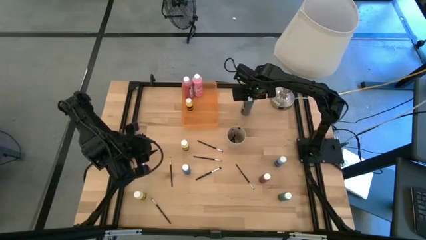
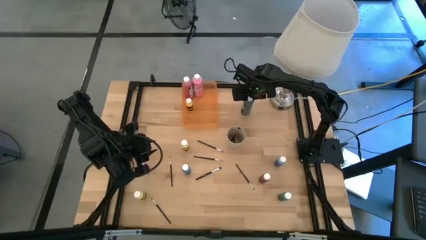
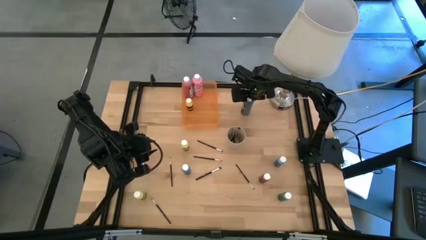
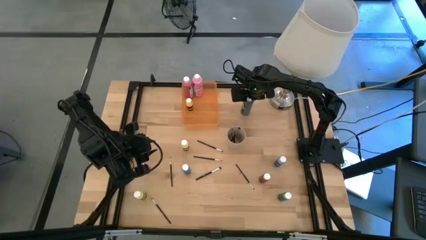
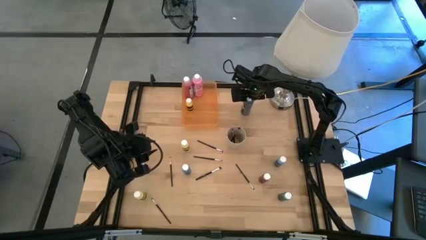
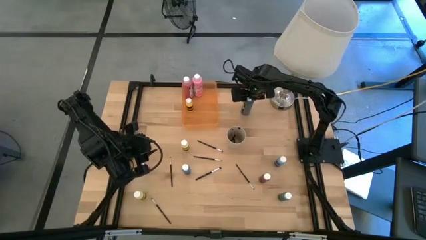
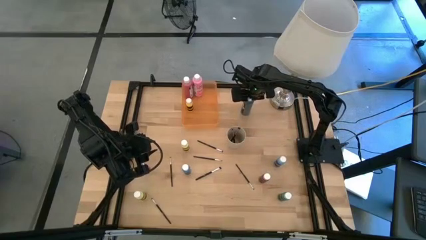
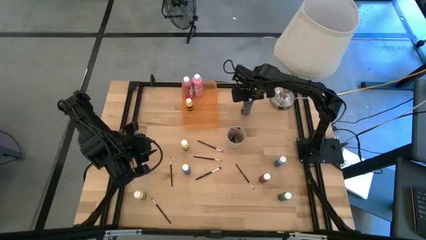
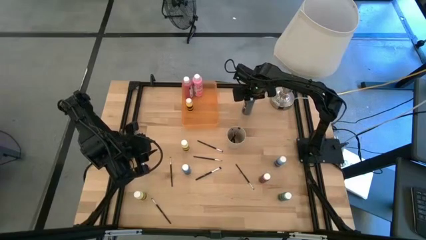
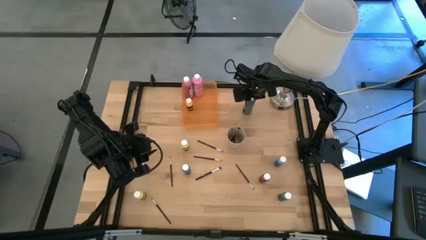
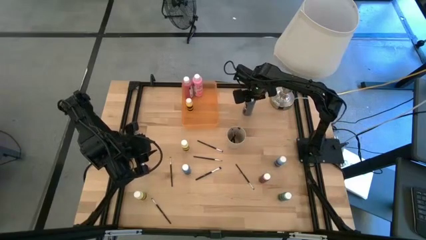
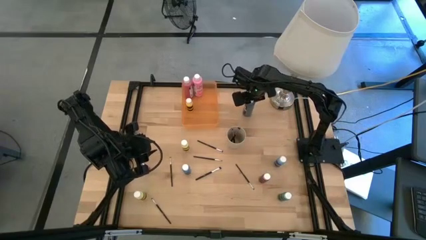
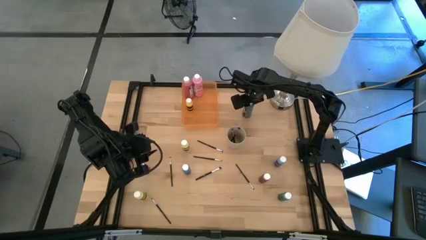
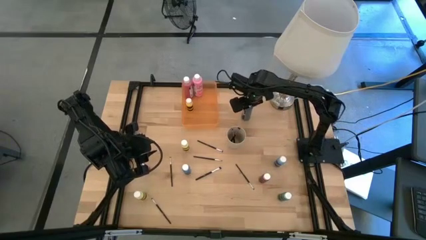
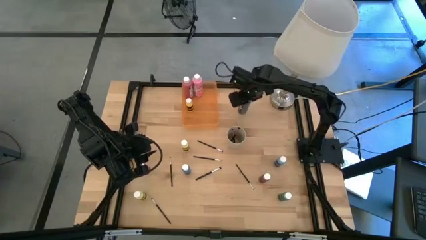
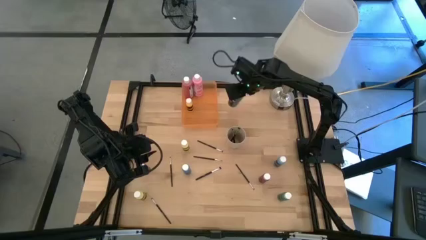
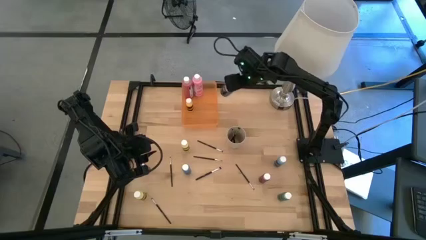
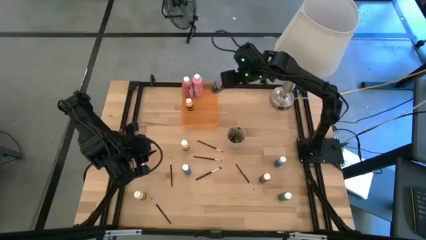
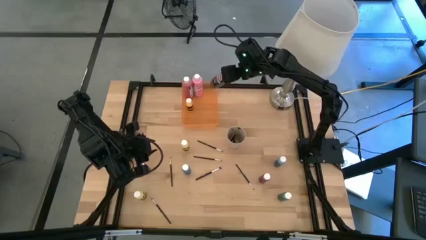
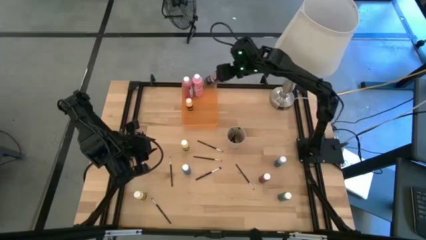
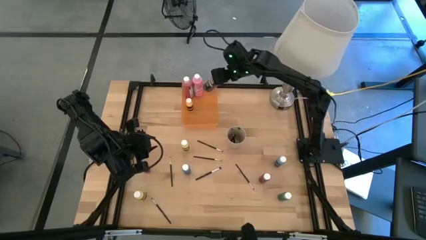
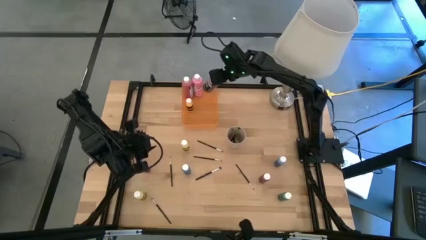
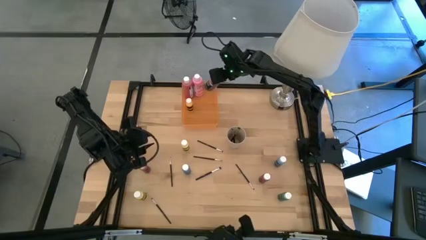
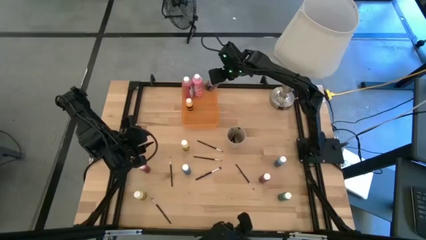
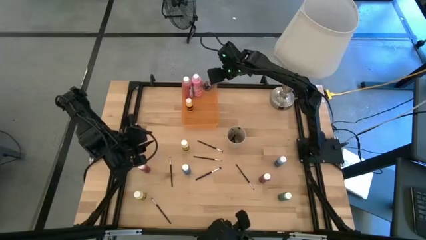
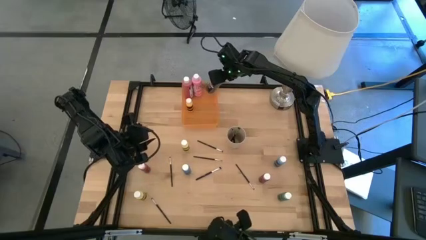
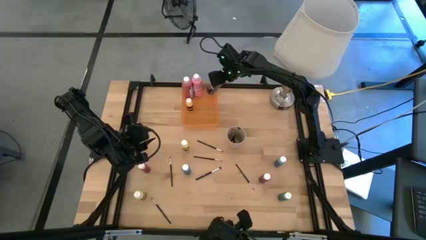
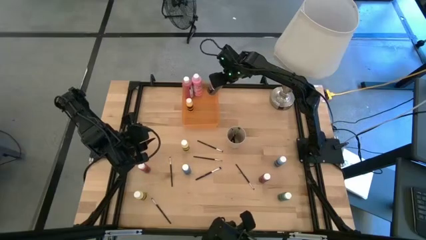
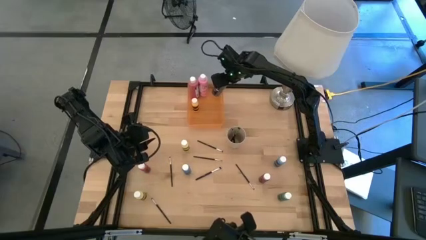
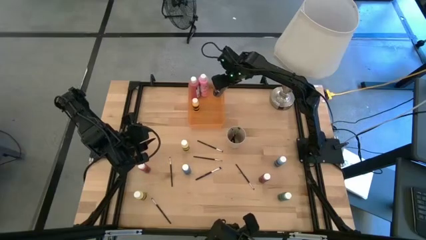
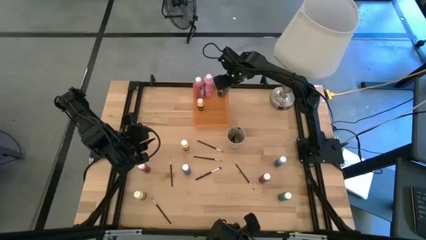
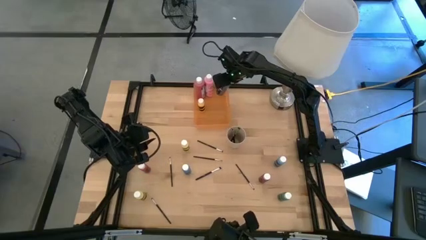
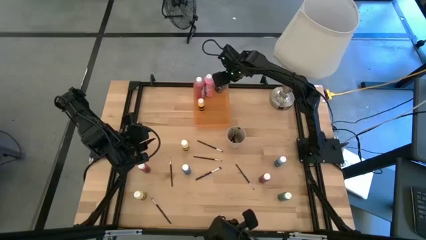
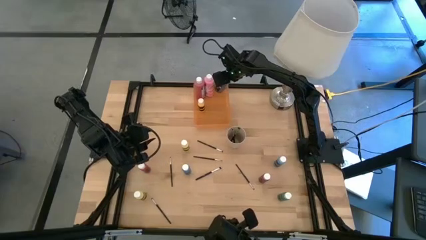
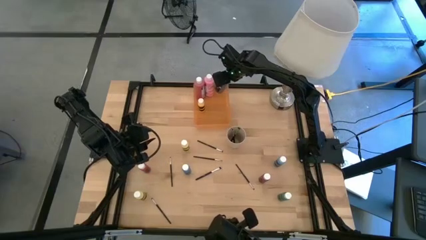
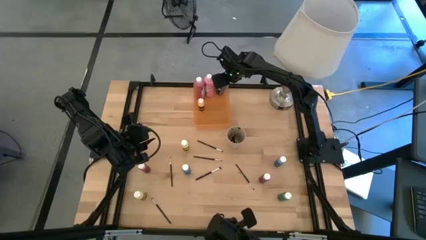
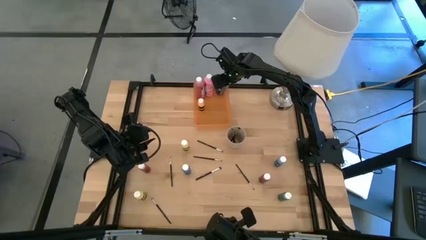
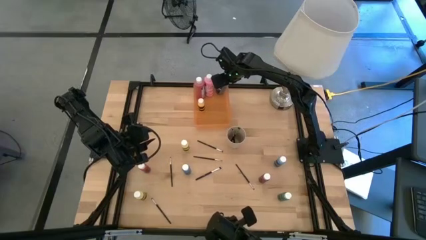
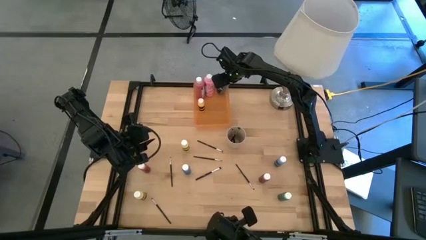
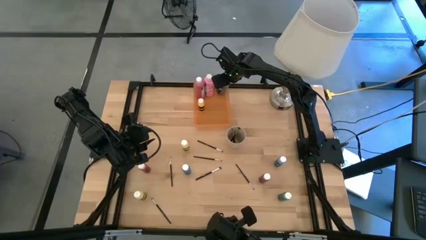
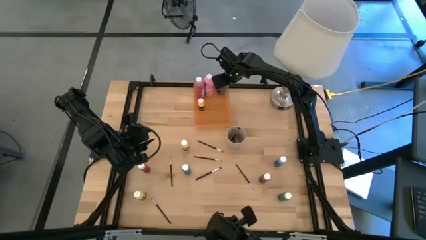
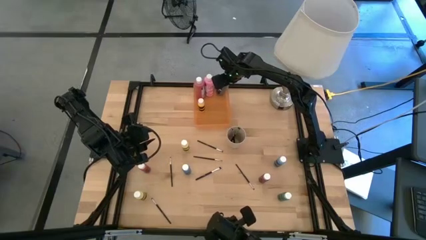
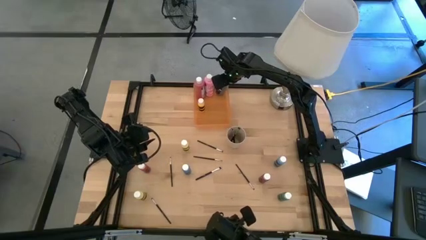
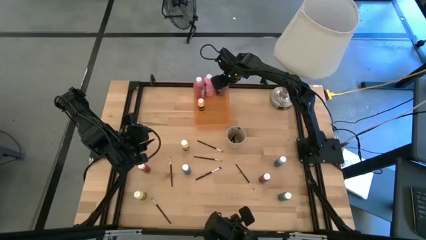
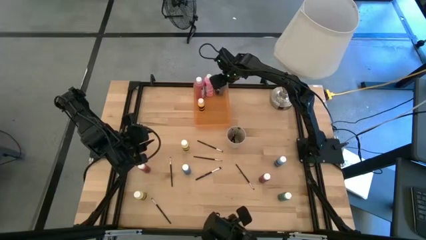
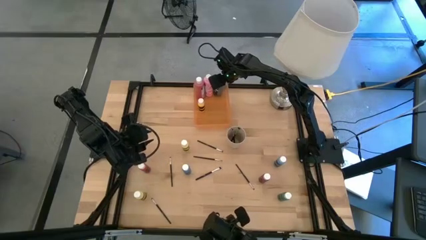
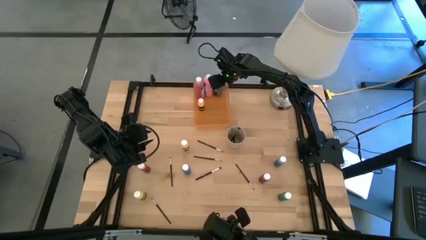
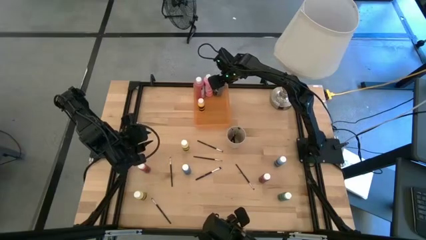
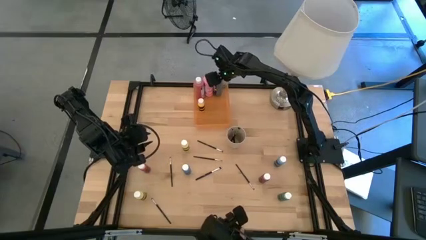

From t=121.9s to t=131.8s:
Task: Pick & Place Paint Supplies
Put the large black paint bottle into the orange bin

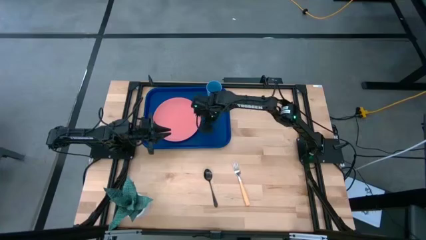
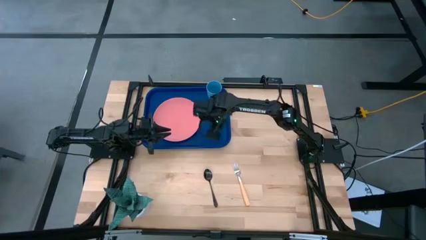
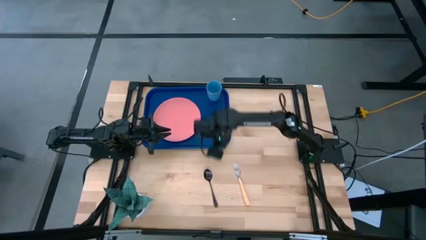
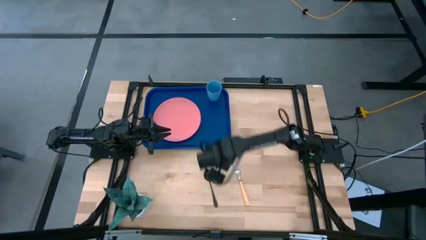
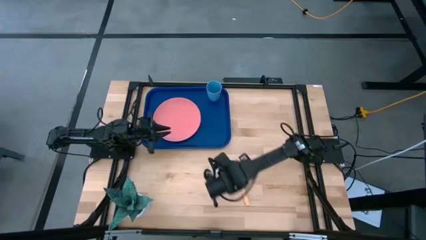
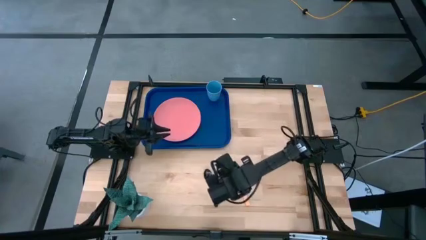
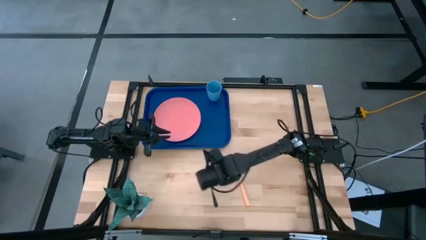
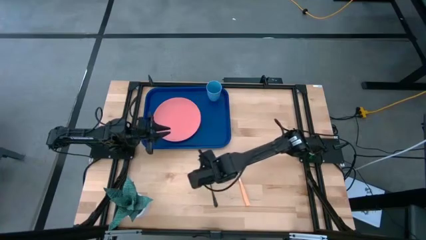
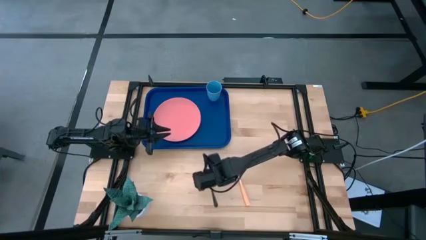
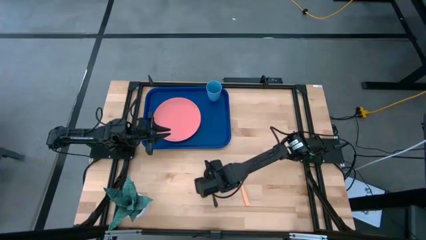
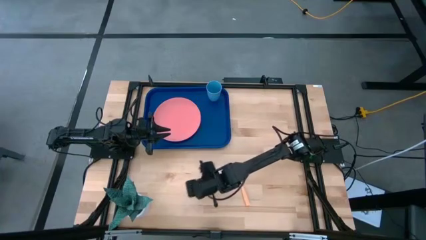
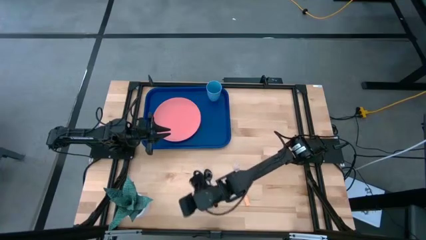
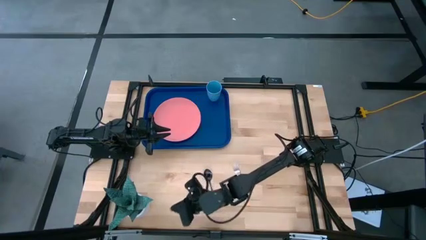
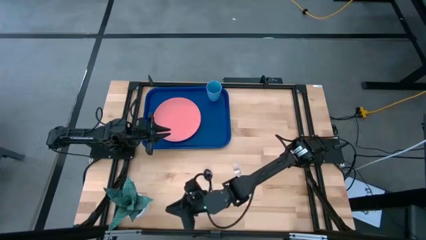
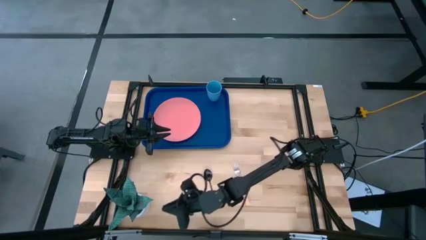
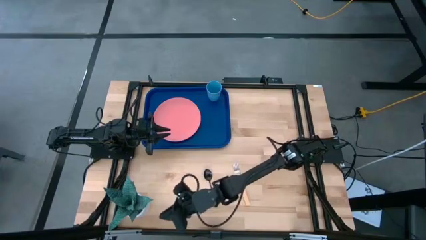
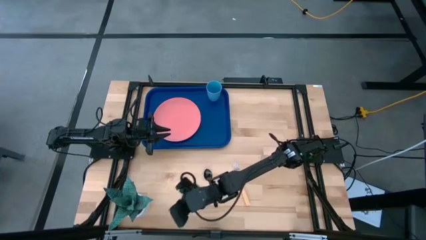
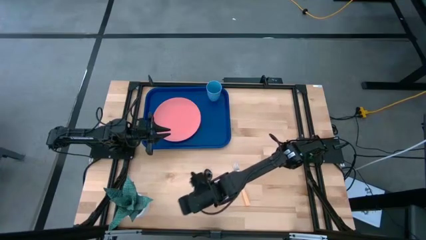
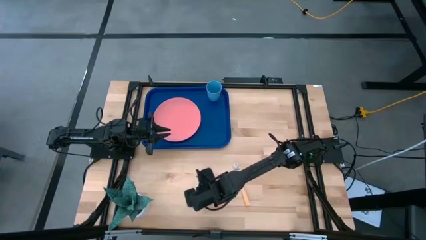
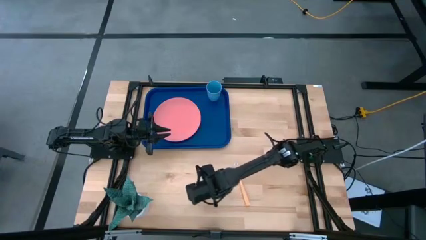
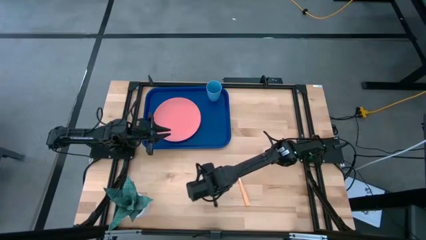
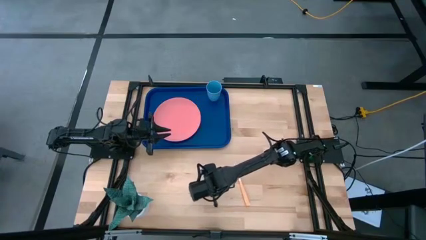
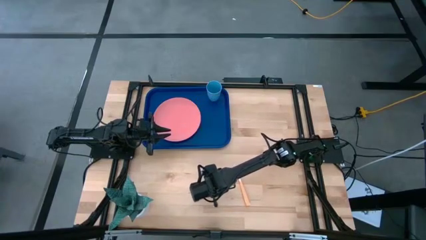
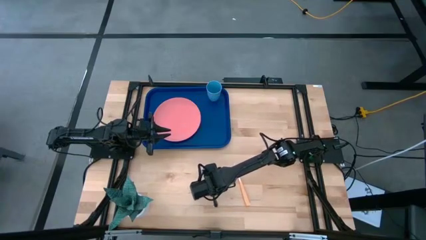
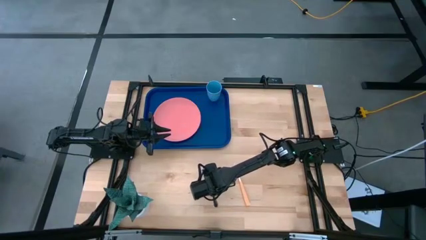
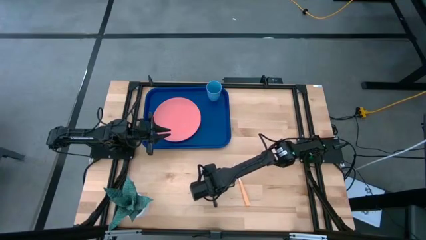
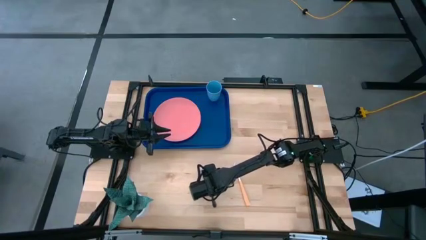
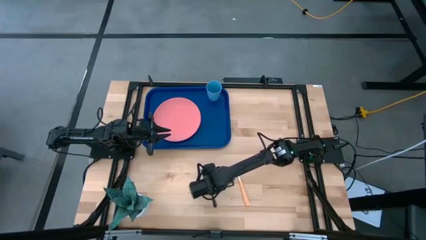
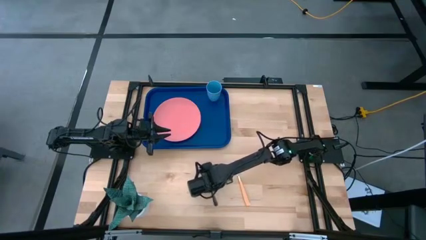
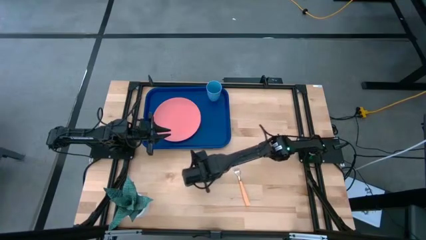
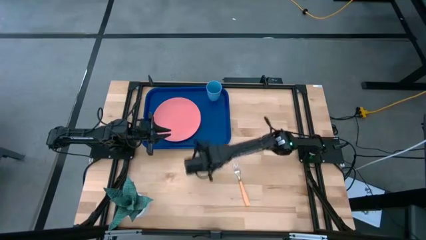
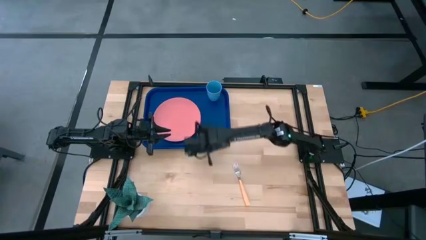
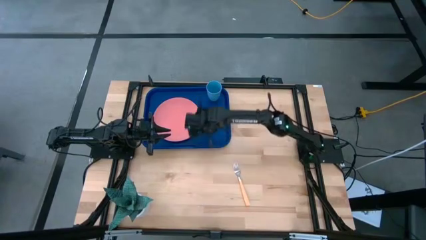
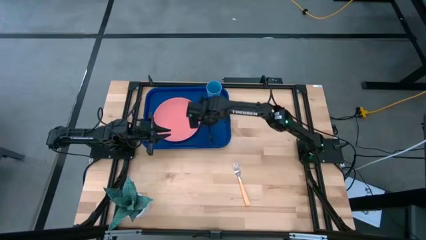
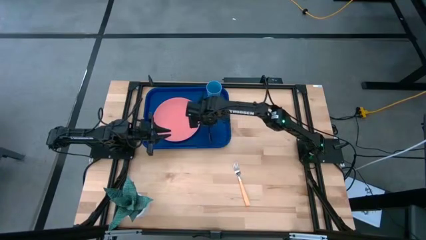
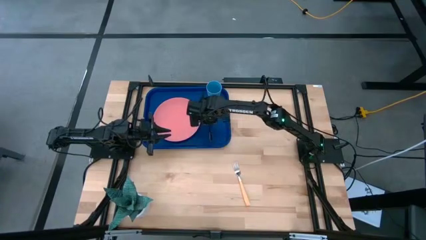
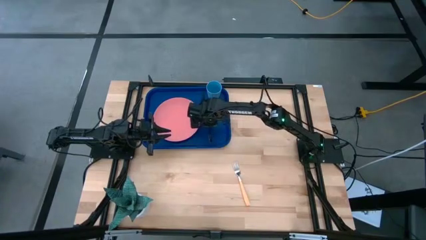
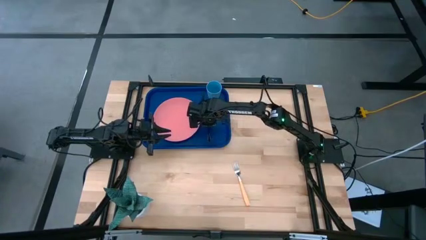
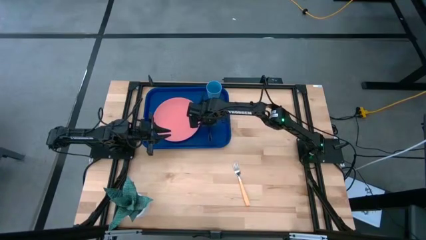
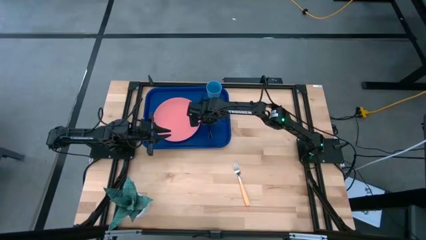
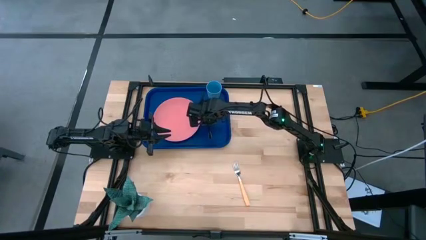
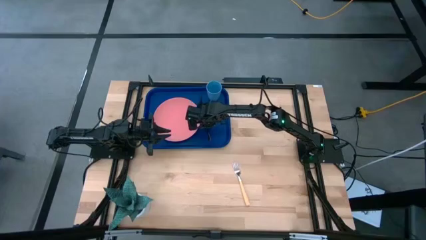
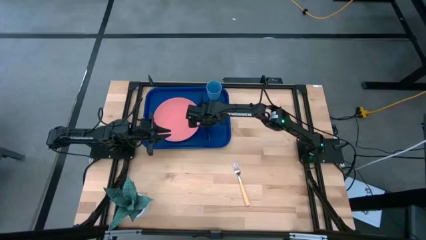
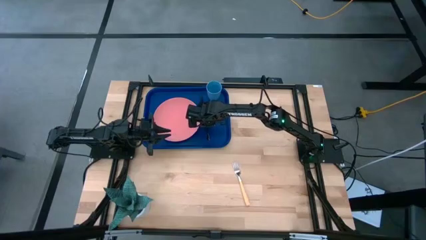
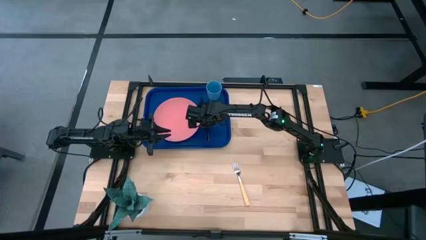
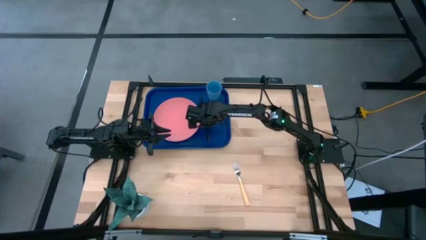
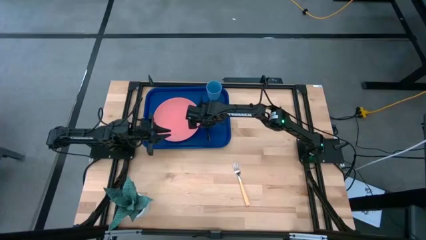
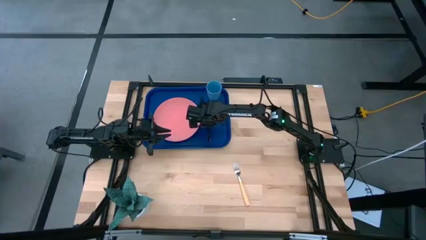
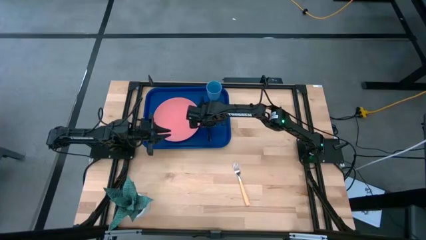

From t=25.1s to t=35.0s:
Task: Pick and place plate/cup/fork/spoon on tray
Put the spoon right side of the plate
